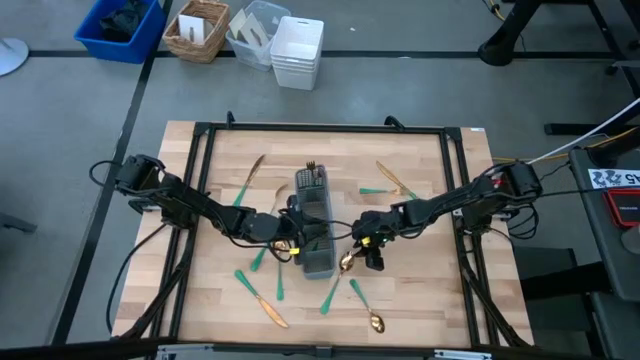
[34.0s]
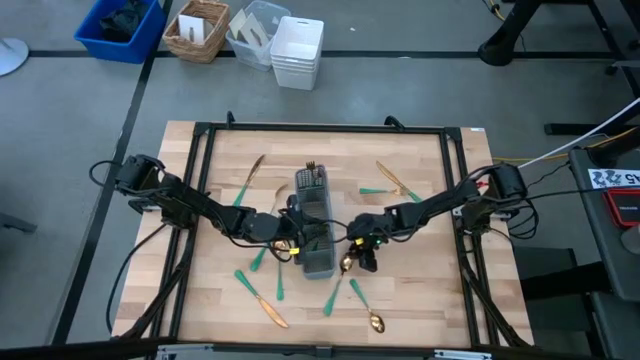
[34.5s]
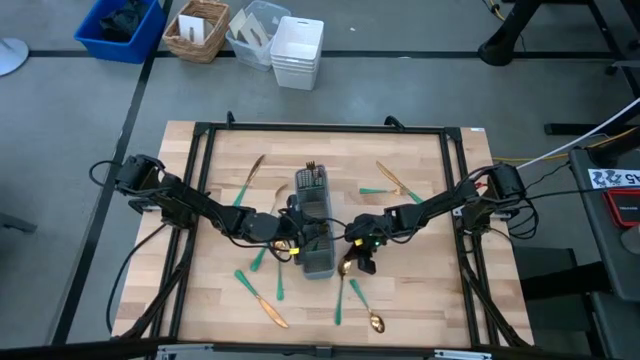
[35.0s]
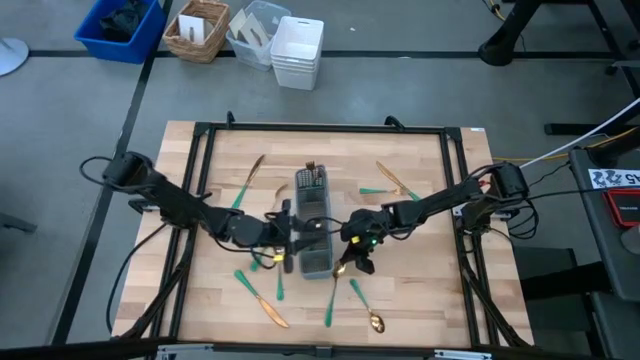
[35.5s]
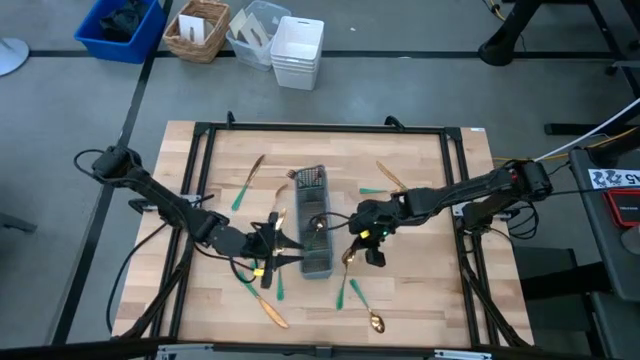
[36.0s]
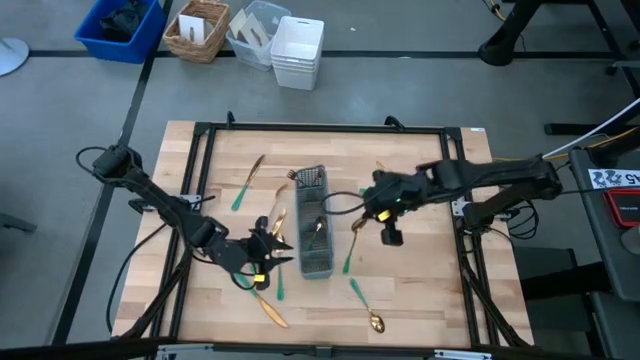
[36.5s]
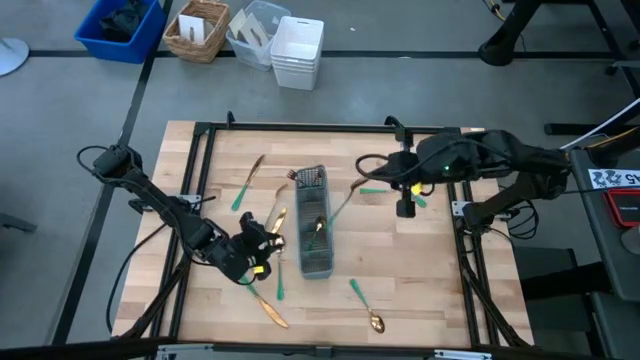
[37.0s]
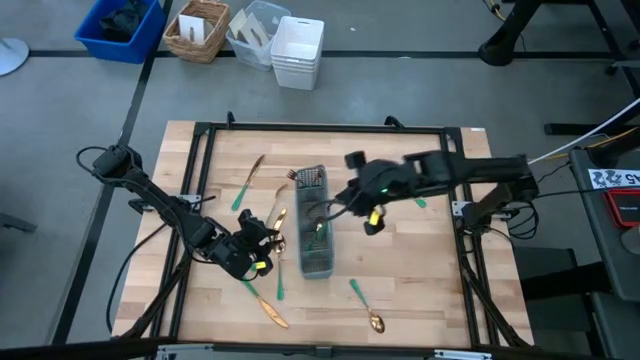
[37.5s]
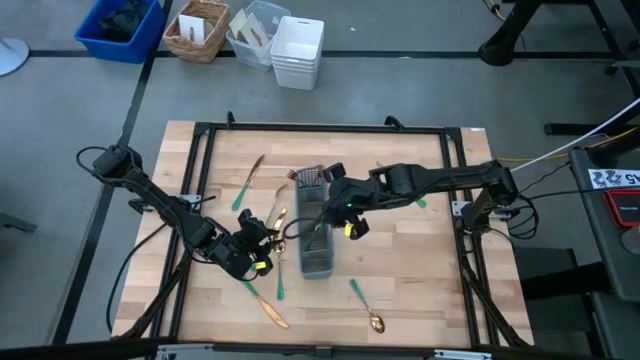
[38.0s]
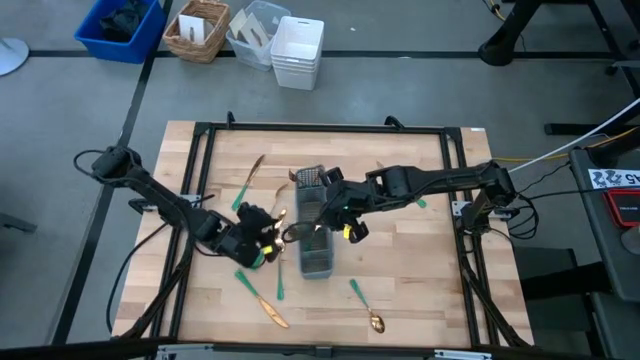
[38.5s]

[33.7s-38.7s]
Task: Sort silverware
Put the green spoon into the utensil rack

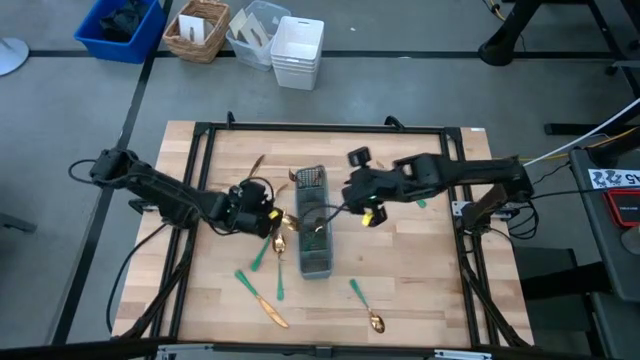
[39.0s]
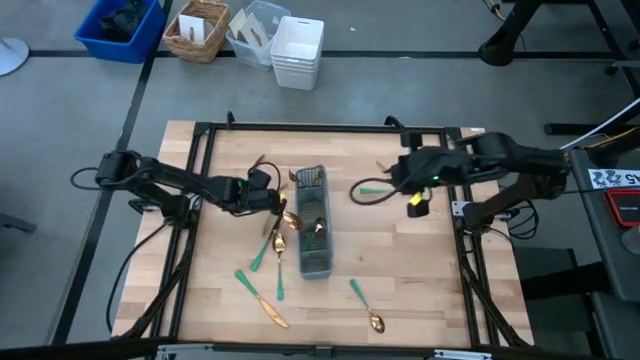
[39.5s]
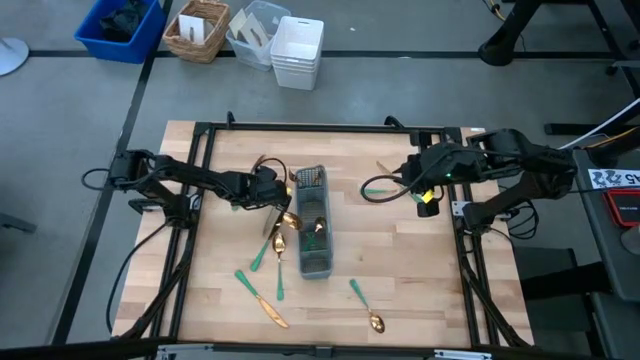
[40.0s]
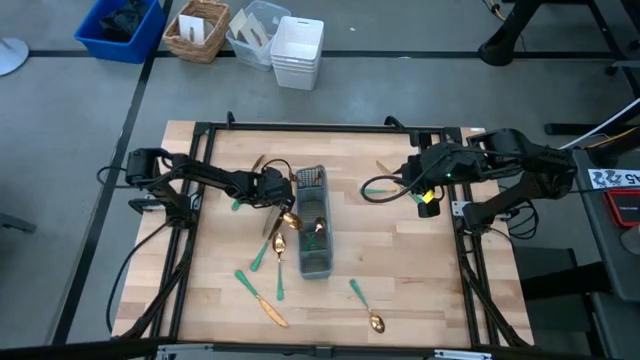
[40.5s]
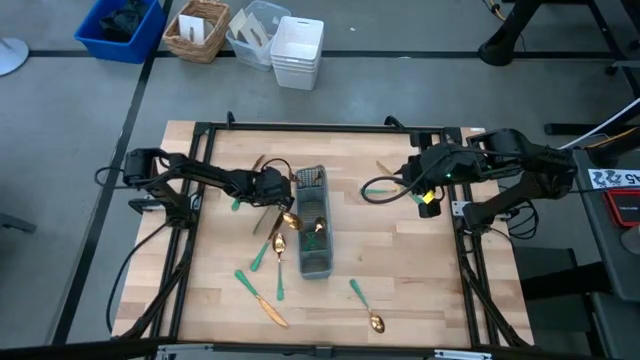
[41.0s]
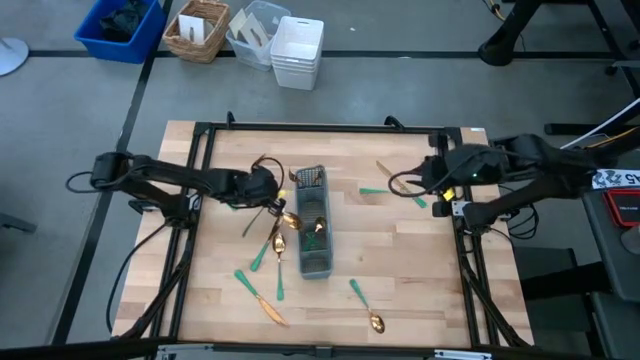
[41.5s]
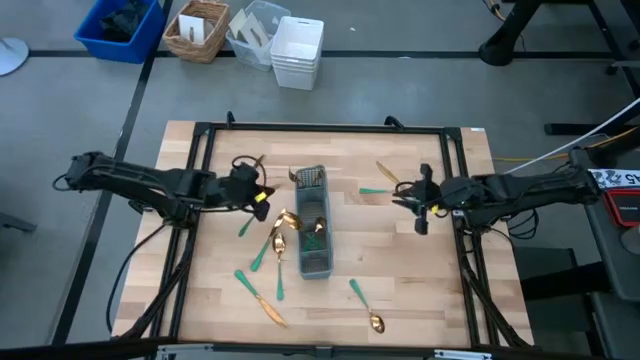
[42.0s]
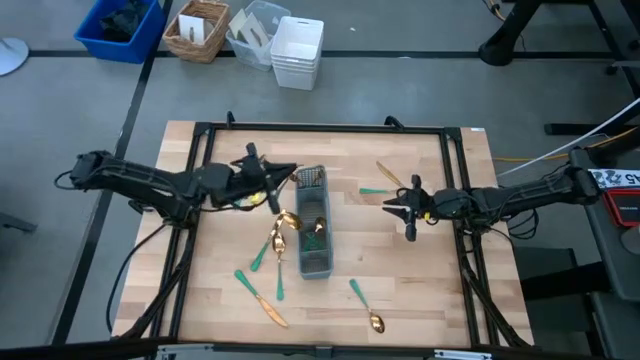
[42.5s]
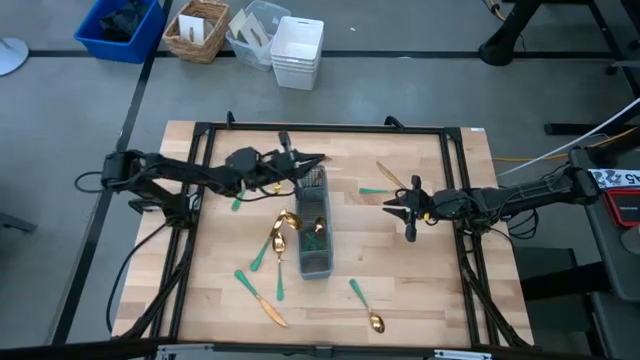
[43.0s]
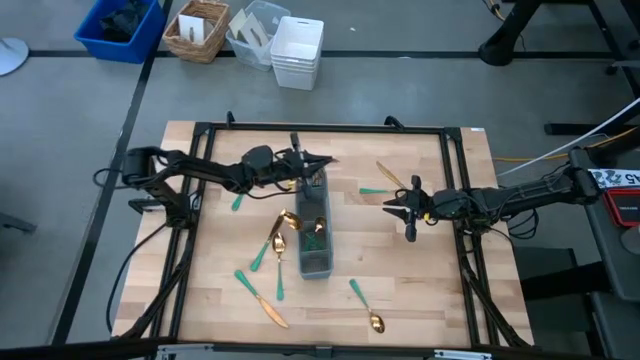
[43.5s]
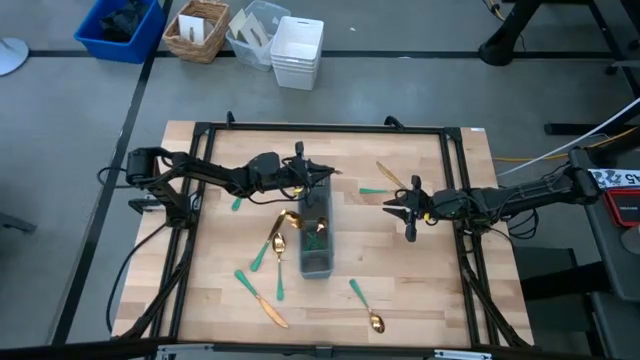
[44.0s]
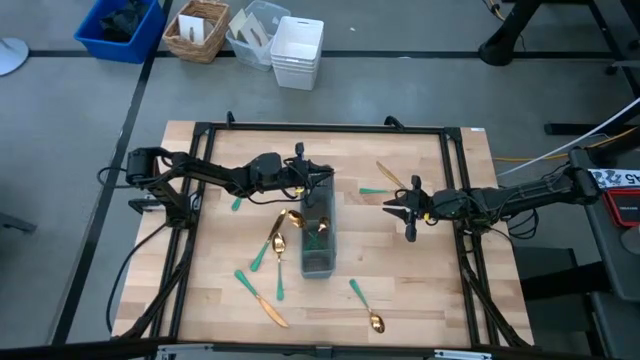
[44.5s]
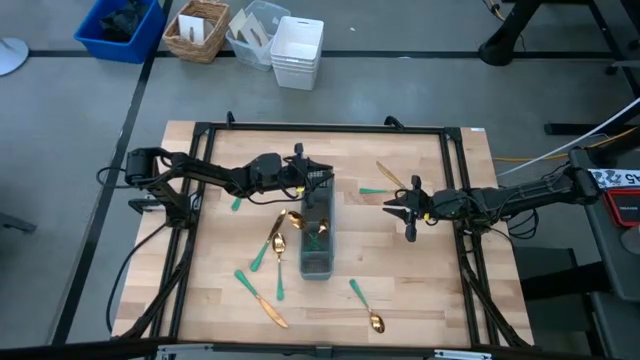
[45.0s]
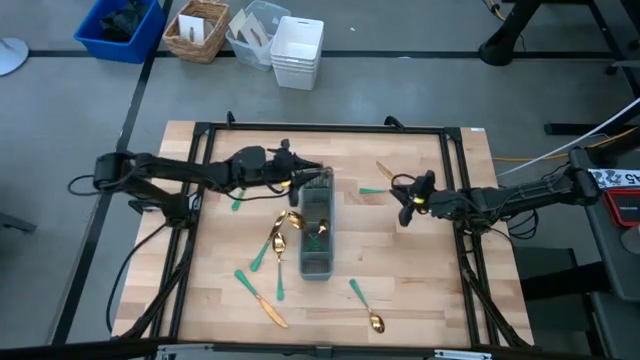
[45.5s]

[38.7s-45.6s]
Put the green fork into the utensil rack

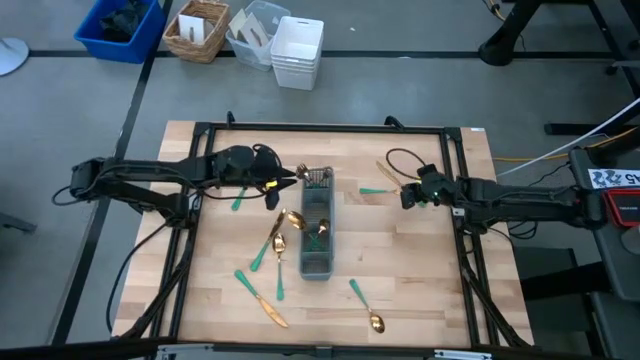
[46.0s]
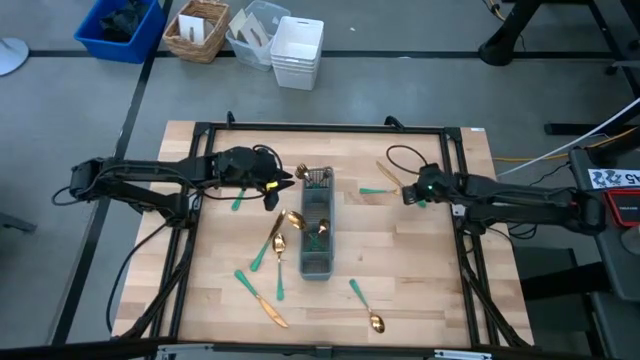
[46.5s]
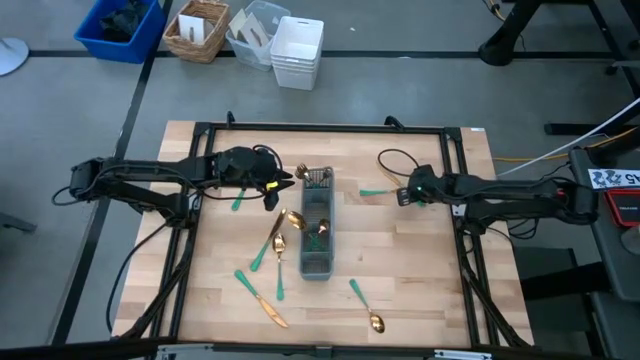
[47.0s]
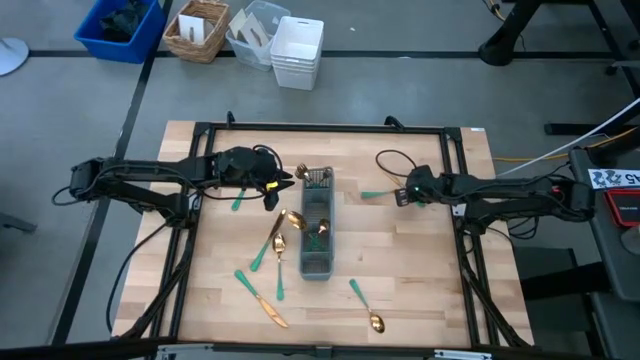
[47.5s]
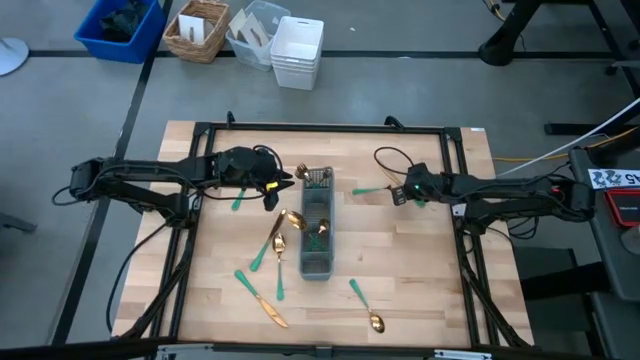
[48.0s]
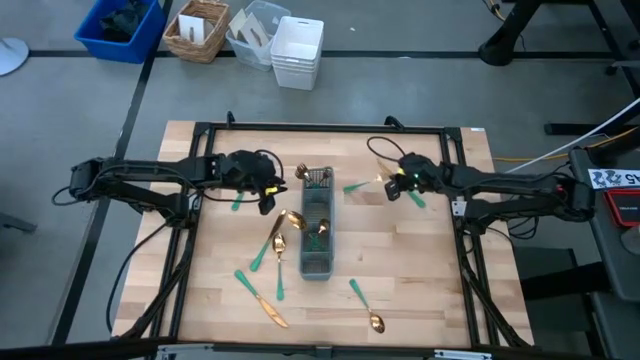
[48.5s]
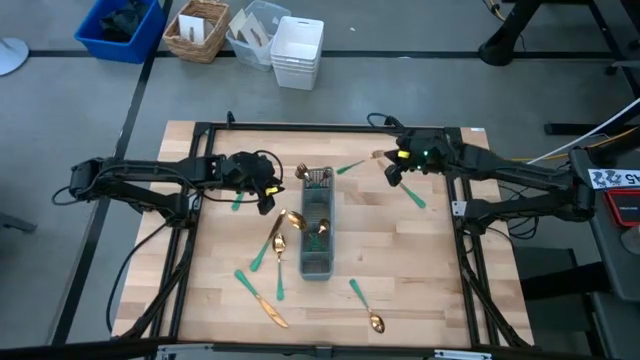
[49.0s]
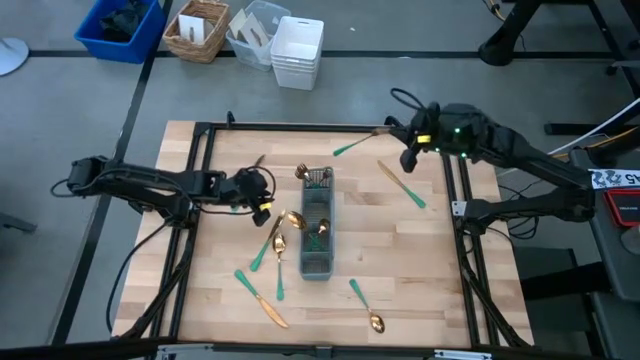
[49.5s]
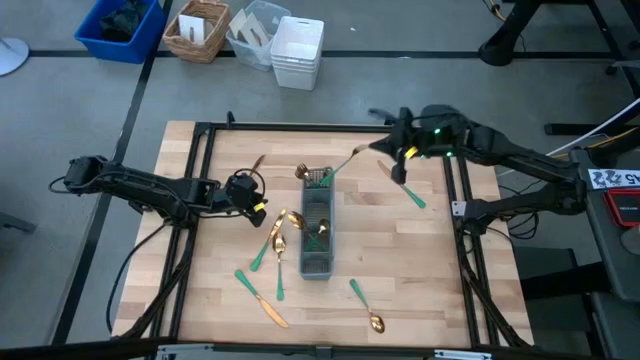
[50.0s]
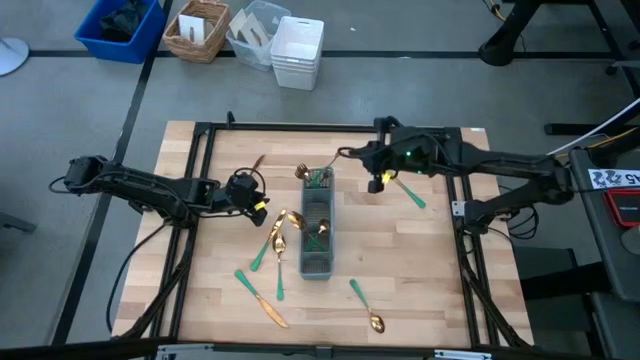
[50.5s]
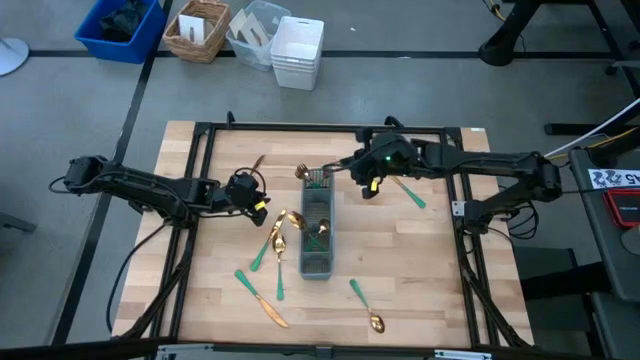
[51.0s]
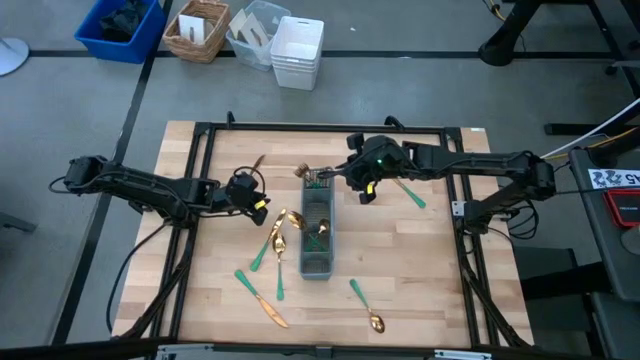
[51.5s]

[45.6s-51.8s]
Put the green fork into the utensil rack

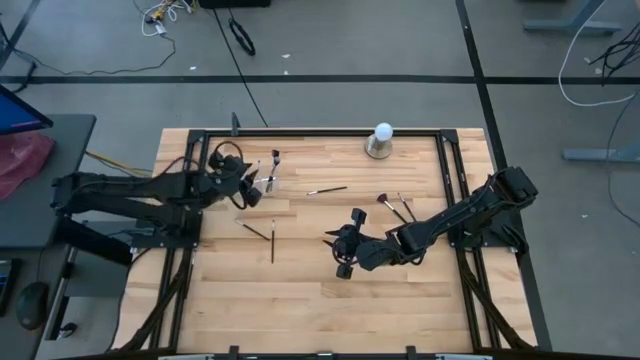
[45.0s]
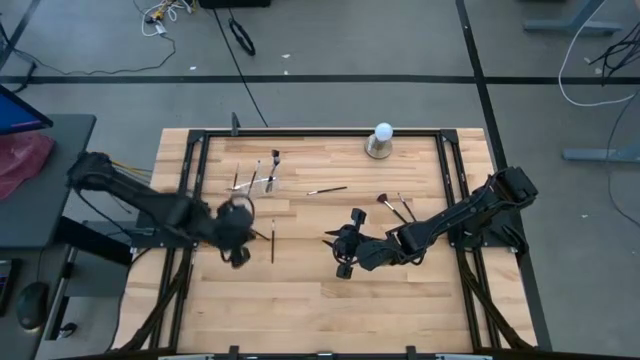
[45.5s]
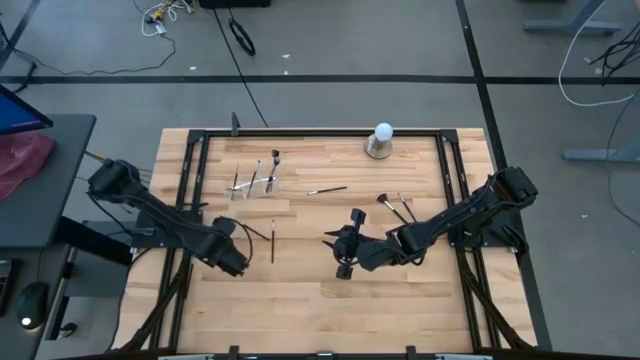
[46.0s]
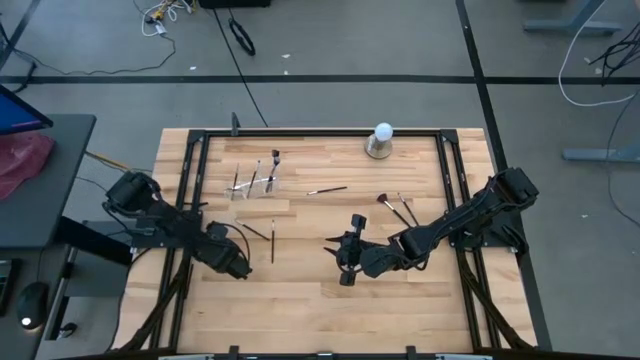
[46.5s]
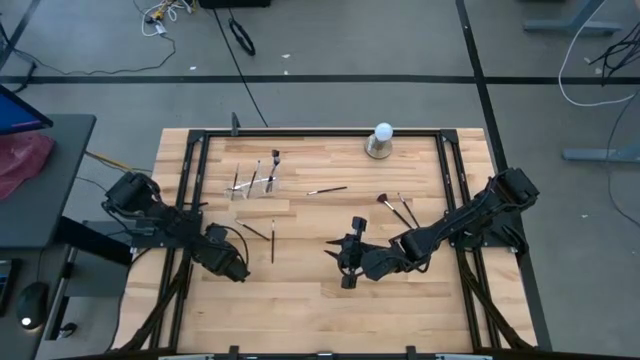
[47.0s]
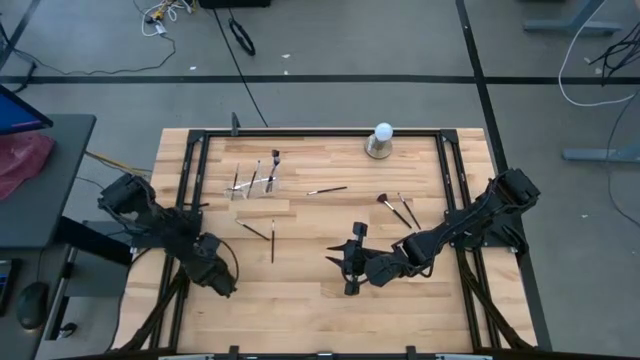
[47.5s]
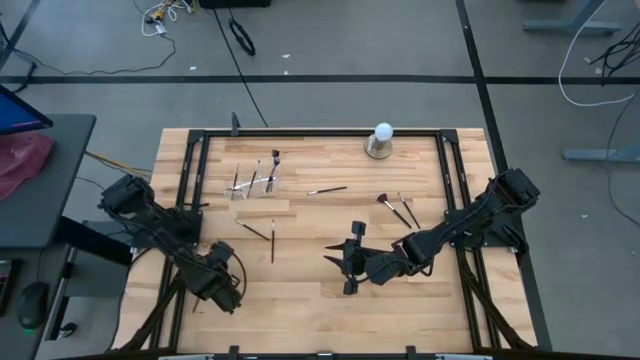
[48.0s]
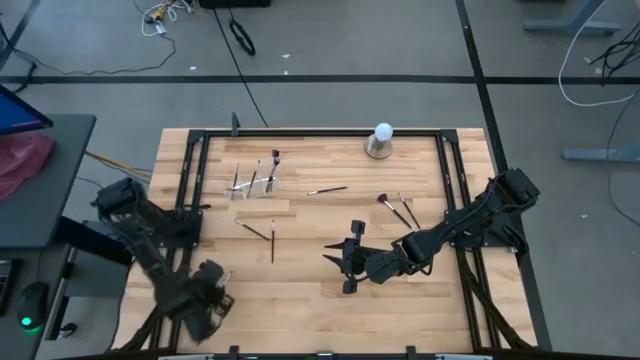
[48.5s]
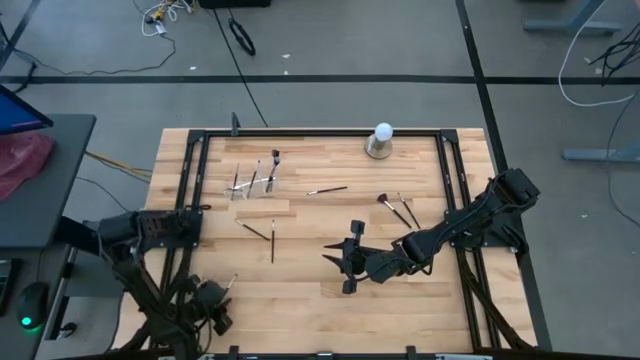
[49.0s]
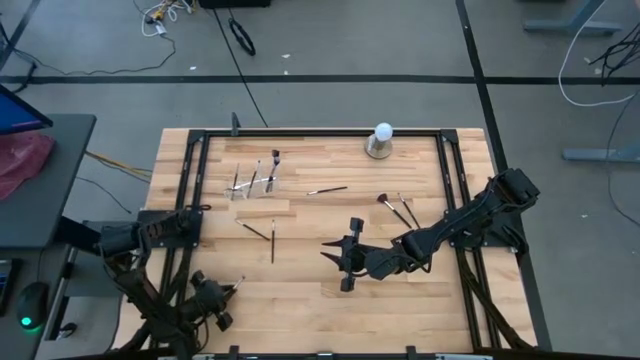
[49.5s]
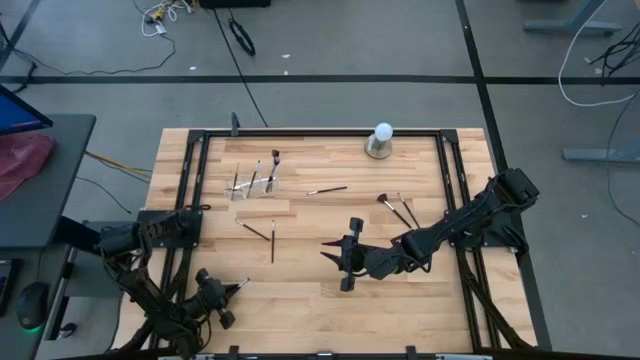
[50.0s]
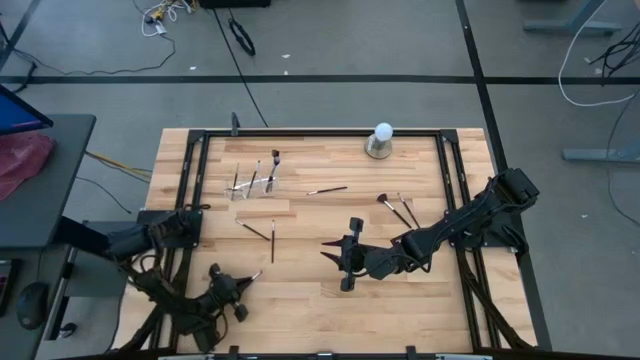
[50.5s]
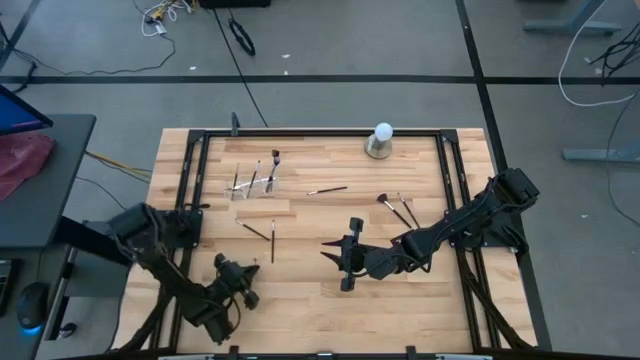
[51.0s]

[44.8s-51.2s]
Task: Put items in baskets/containers
Put the black eyeshadow brush into the middle section of the transparent organizer
